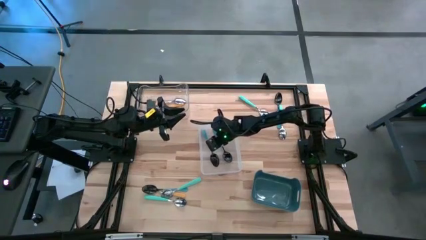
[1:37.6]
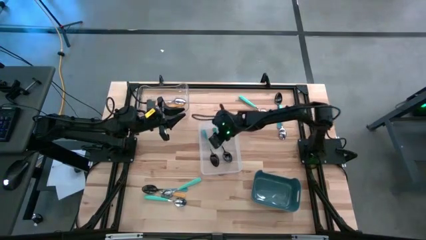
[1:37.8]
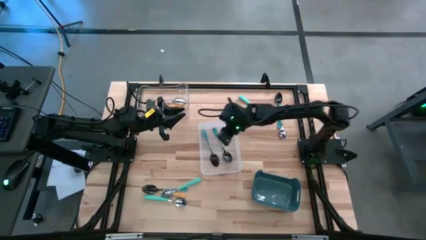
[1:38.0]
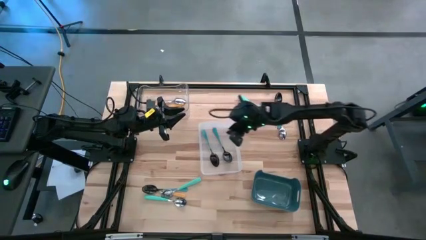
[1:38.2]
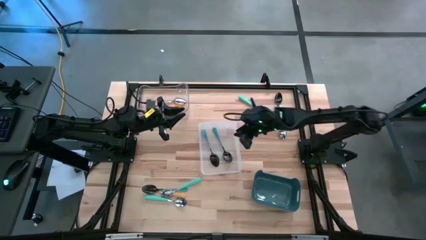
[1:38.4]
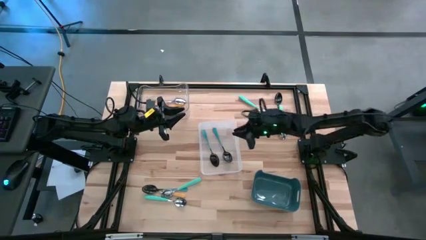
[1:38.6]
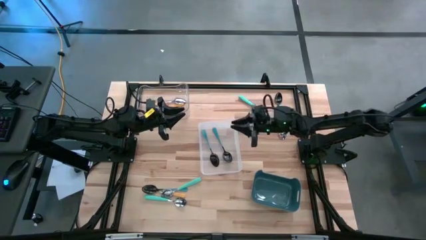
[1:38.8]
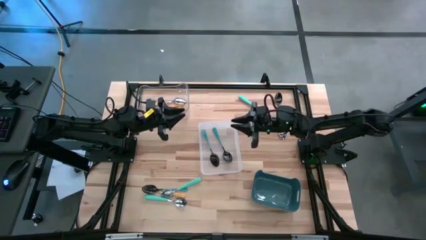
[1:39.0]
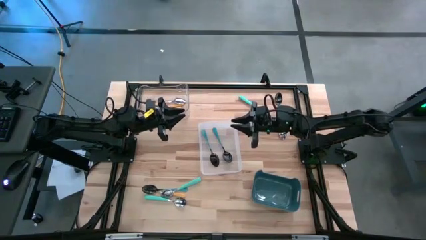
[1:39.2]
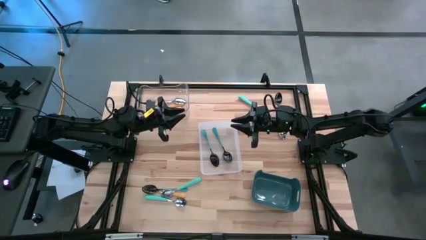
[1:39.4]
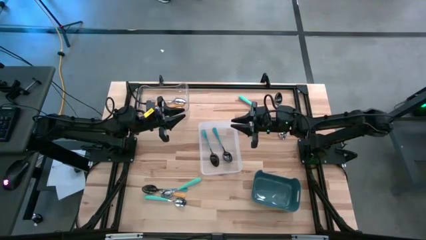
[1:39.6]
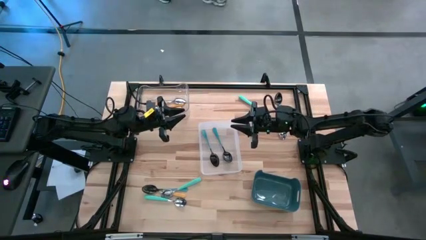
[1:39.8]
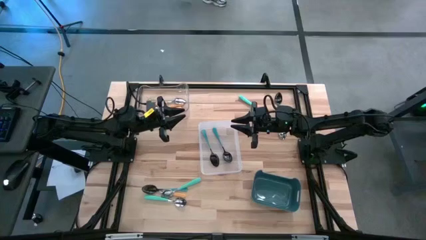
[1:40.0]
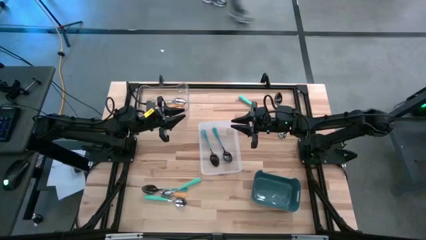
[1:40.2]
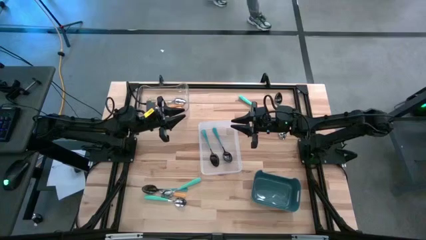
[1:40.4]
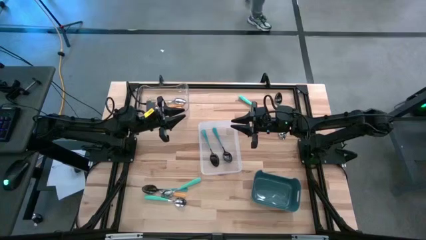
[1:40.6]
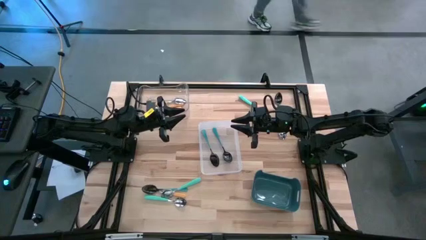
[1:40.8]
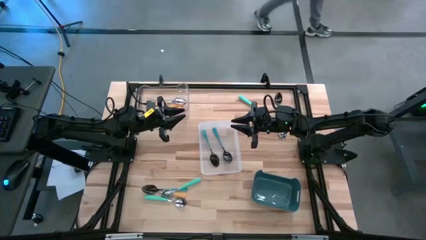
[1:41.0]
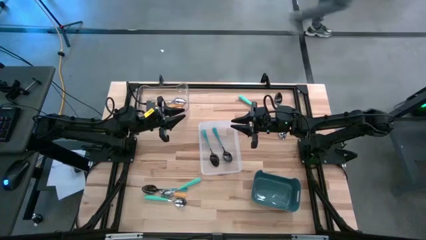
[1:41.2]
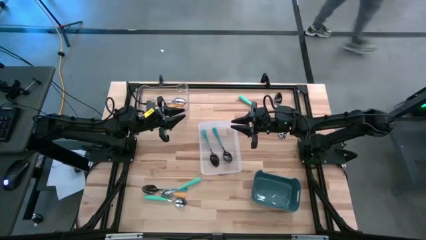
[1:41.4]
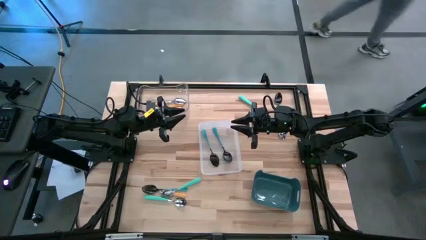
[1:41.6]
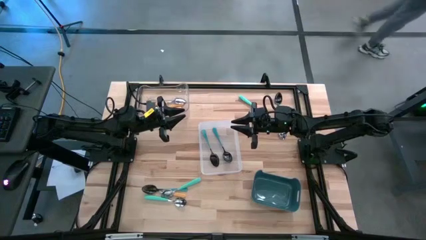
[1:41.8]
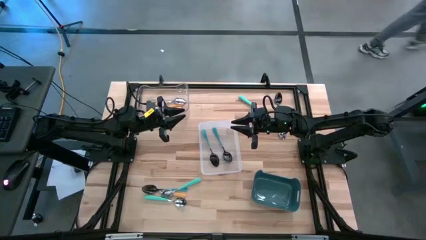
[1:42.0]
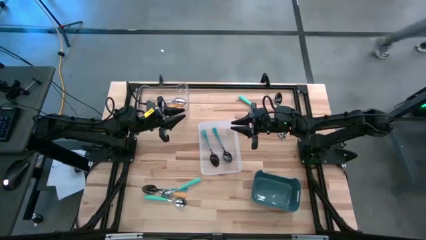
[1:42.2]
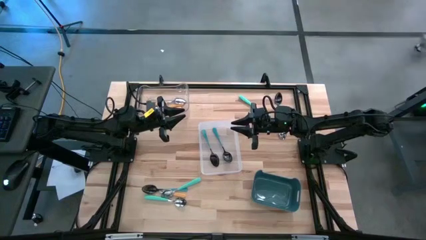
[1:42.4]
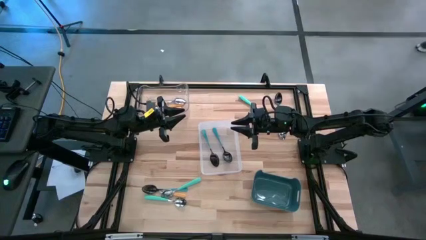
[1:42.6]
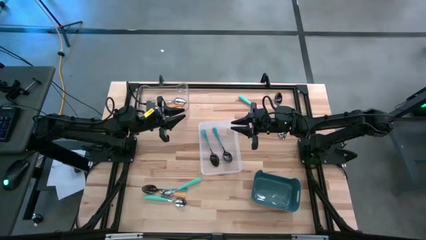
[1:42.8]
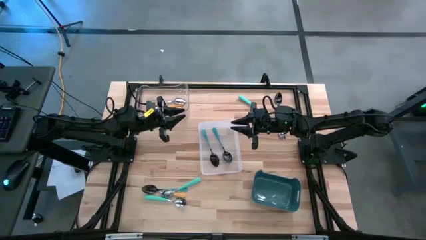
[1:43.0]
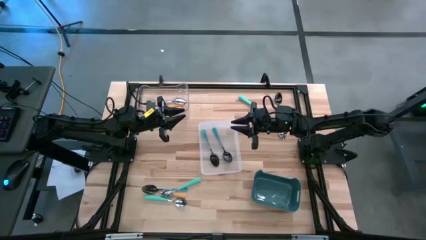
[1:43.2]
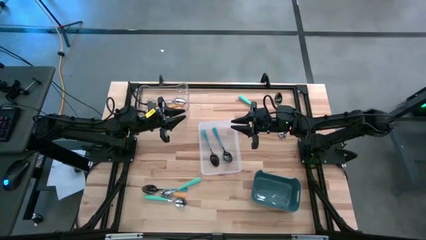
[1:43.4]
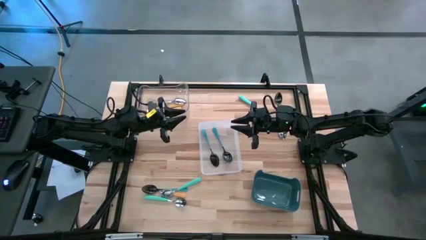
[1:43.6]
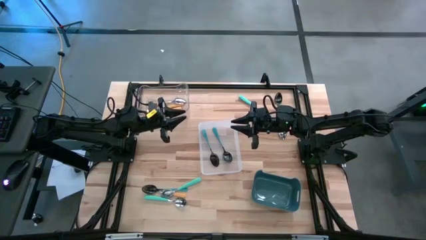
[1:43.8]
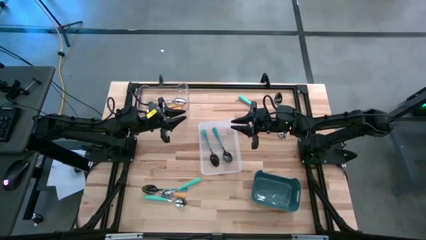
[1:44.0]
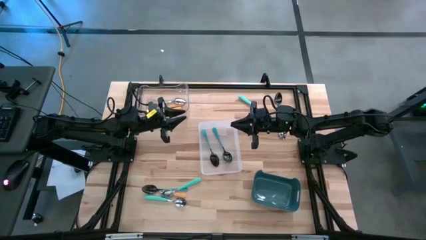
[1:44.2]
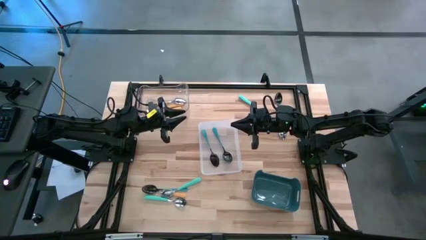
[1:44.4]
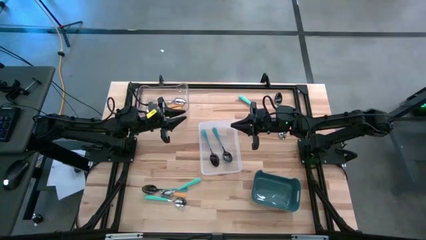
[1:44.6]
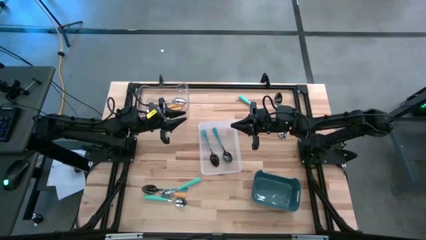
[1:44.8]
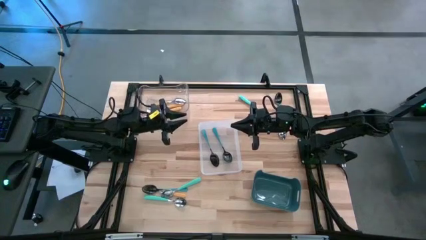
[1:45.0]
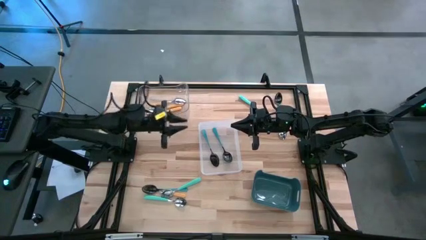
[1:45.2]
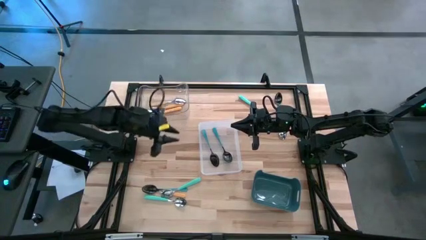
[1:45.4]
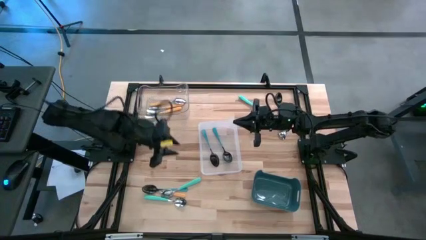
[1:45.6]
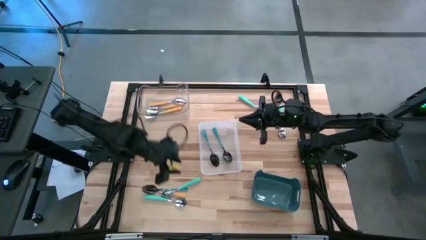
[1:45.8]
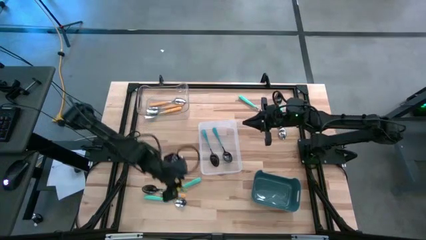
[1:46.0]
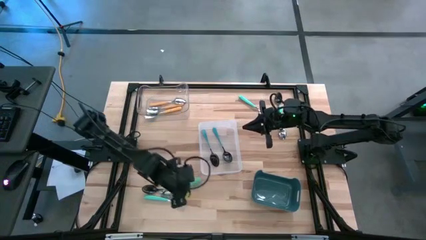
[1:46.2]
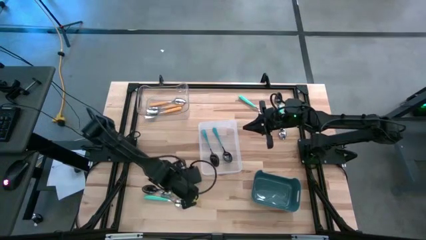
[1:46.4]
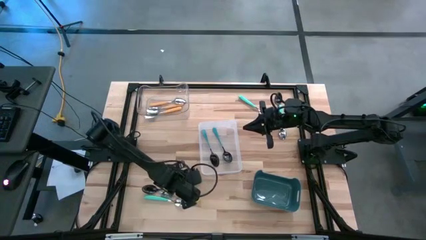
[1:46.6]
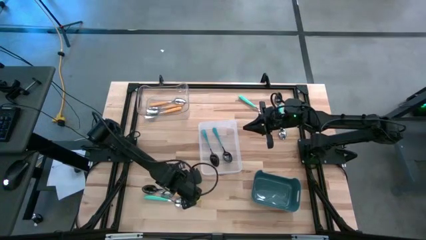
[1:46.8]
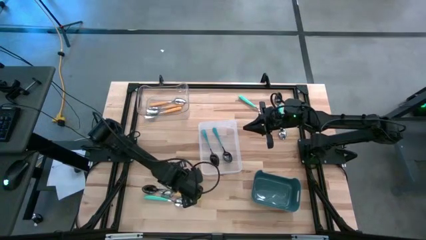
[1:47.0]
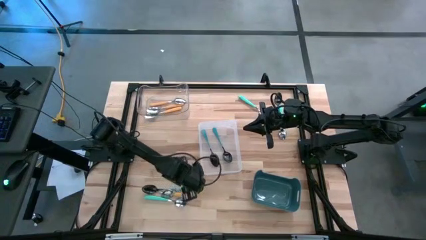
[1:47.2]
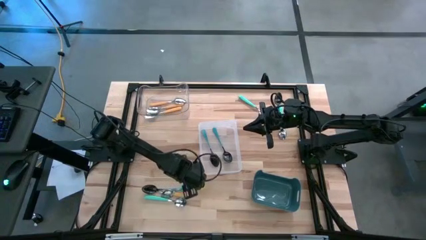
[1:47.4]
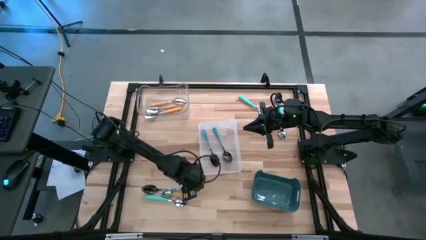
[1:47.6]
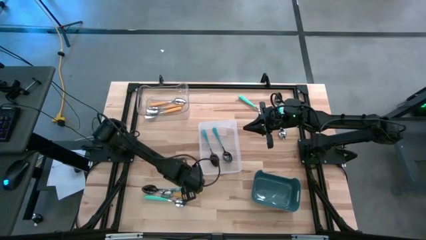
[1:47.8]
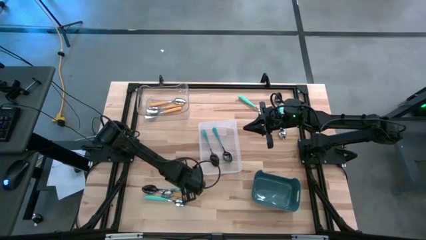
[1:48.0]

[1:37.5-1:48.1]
Task: Sort silverware by color (type)
Put the light blue spoon into the blue bin
